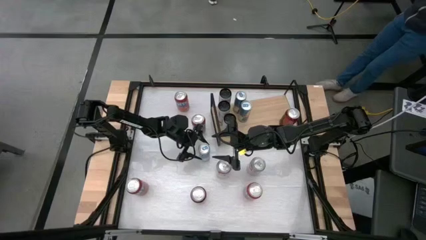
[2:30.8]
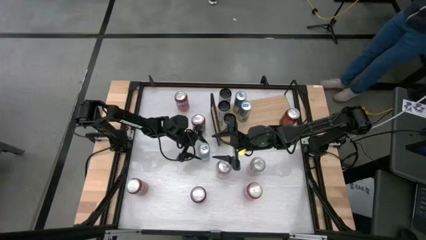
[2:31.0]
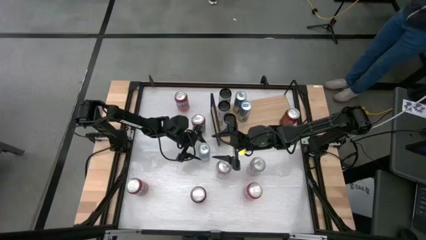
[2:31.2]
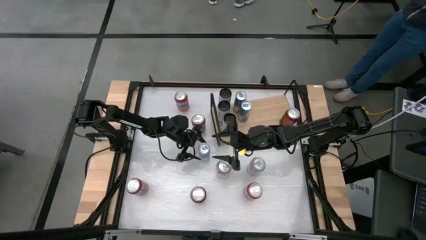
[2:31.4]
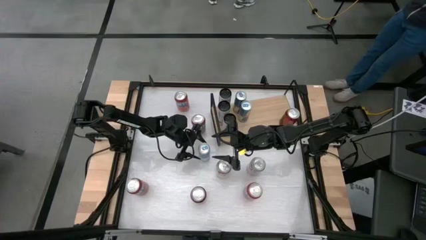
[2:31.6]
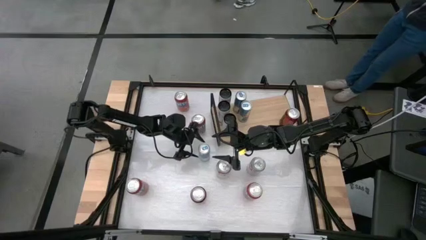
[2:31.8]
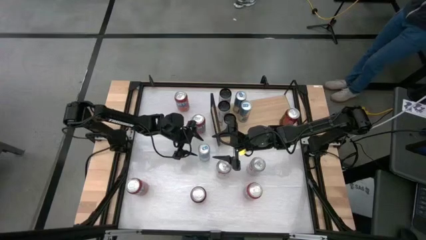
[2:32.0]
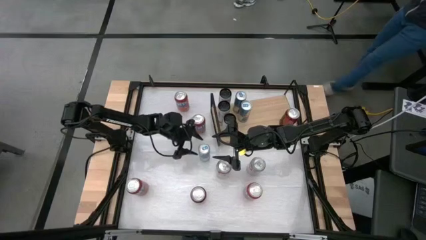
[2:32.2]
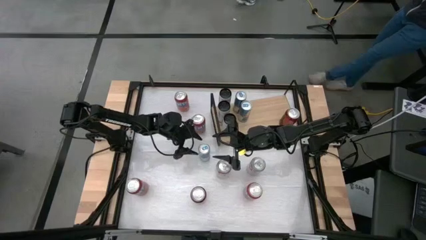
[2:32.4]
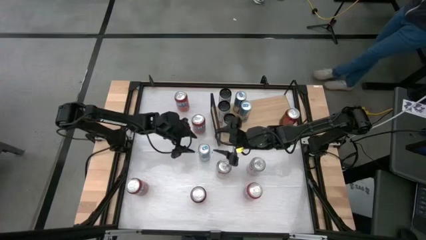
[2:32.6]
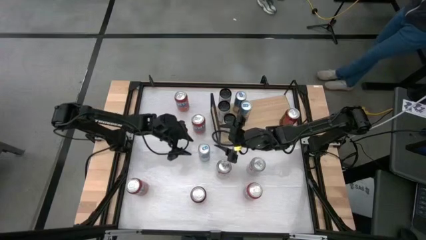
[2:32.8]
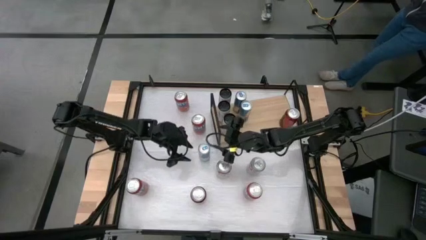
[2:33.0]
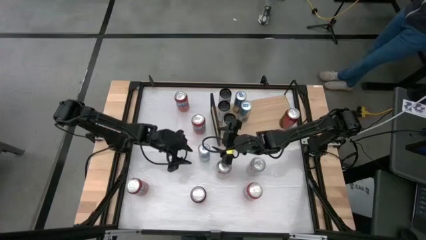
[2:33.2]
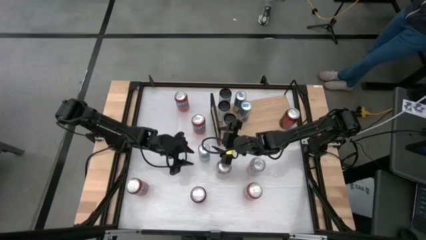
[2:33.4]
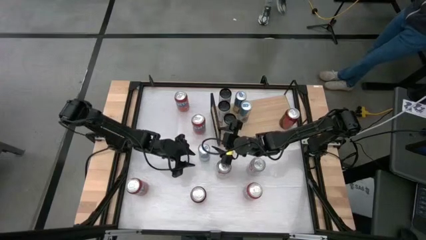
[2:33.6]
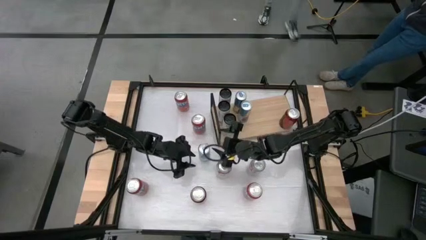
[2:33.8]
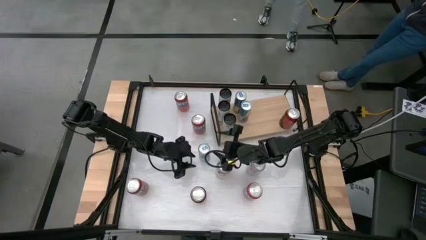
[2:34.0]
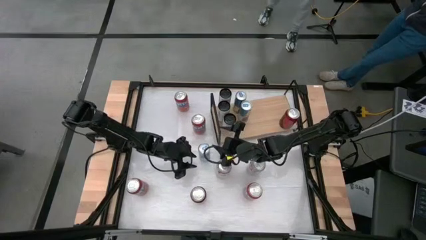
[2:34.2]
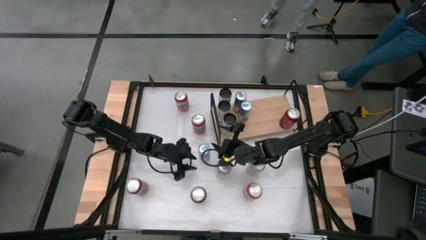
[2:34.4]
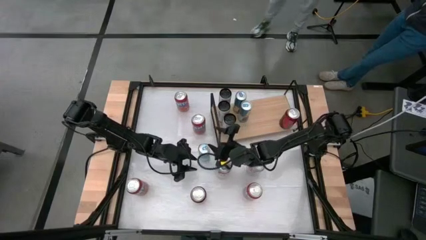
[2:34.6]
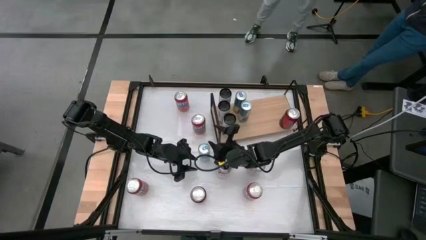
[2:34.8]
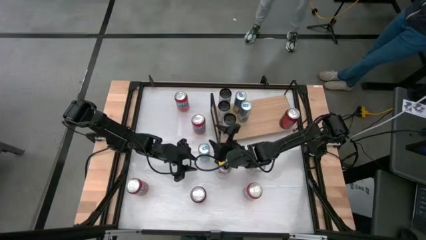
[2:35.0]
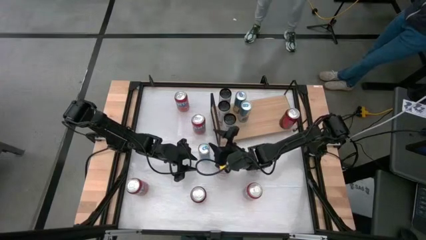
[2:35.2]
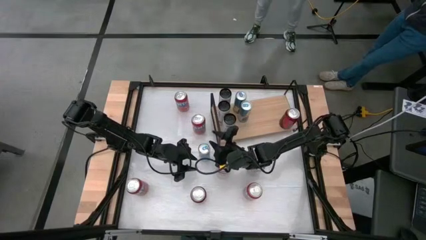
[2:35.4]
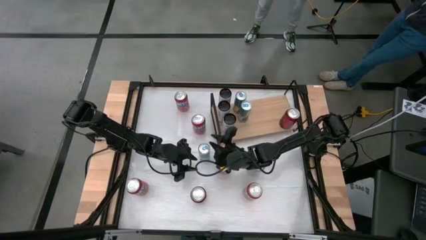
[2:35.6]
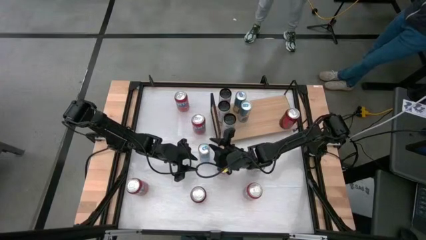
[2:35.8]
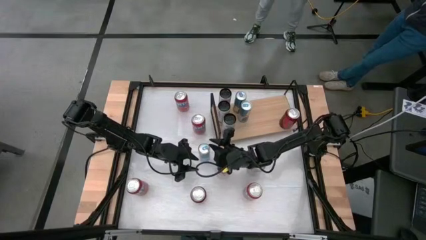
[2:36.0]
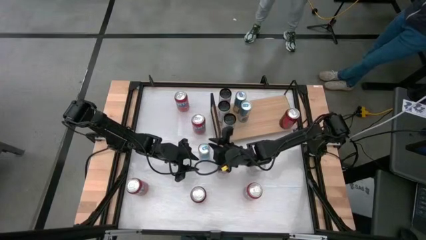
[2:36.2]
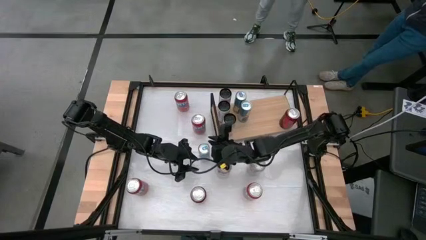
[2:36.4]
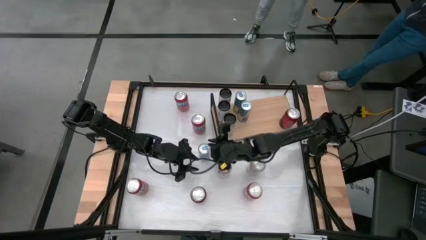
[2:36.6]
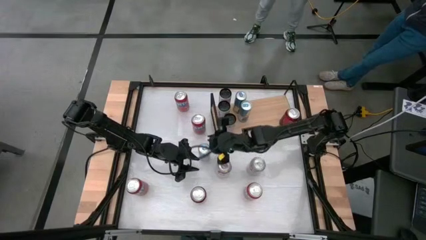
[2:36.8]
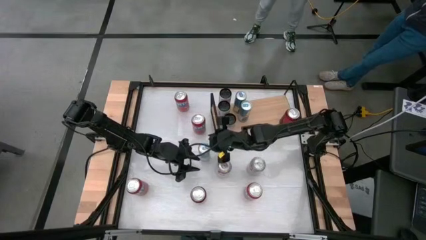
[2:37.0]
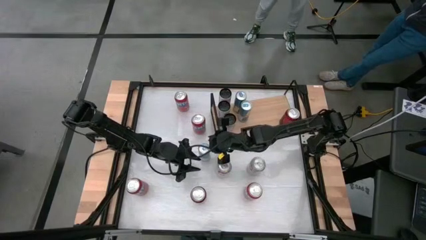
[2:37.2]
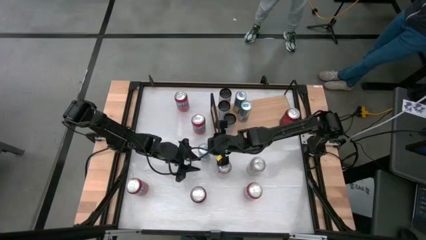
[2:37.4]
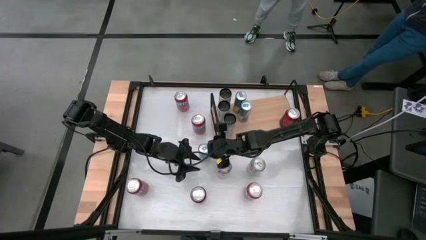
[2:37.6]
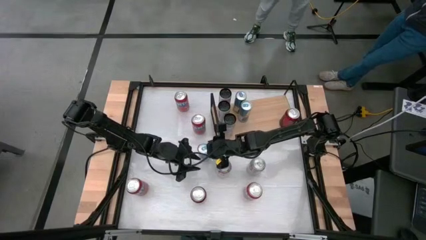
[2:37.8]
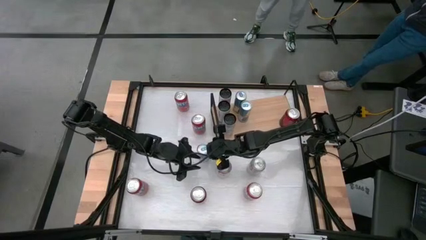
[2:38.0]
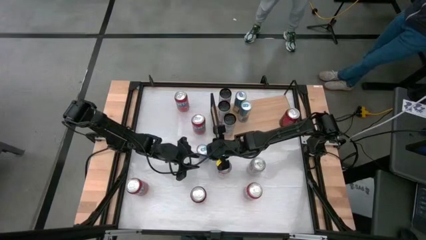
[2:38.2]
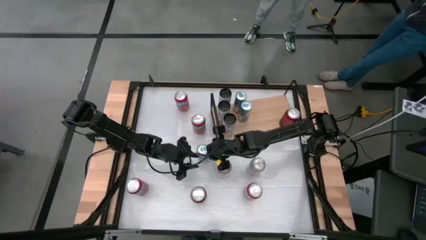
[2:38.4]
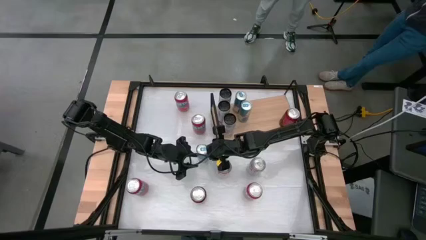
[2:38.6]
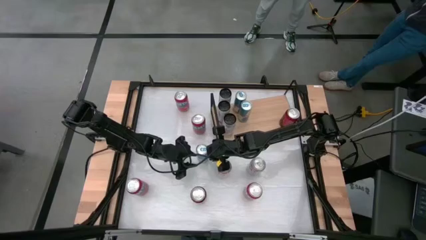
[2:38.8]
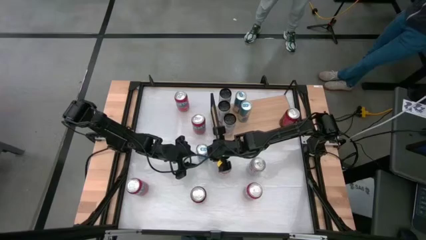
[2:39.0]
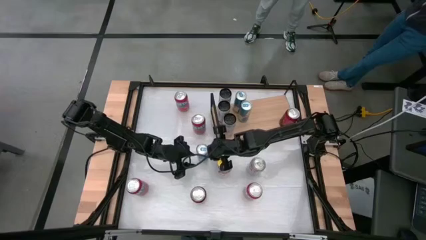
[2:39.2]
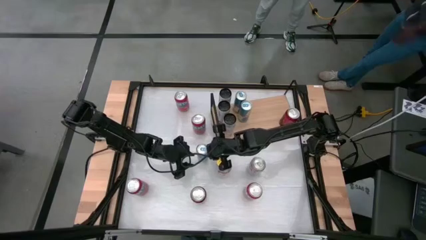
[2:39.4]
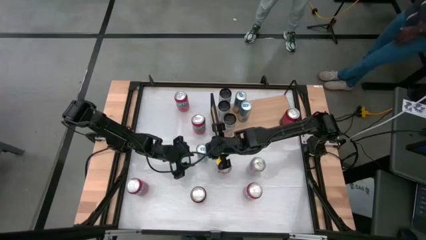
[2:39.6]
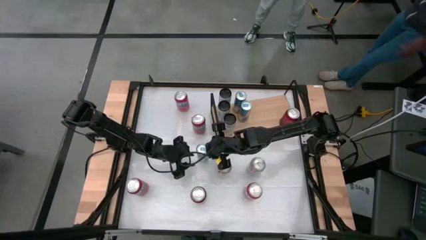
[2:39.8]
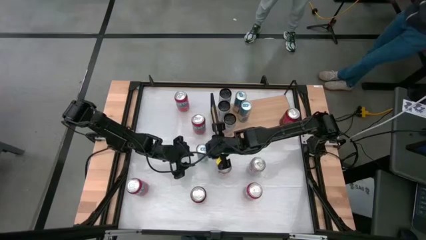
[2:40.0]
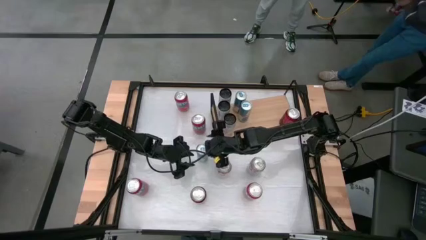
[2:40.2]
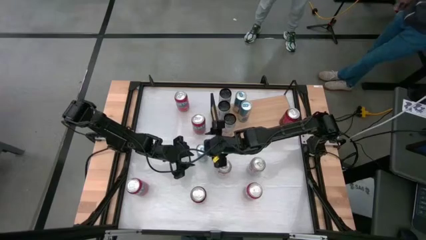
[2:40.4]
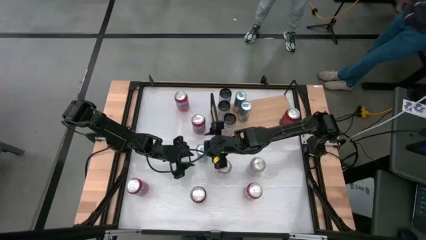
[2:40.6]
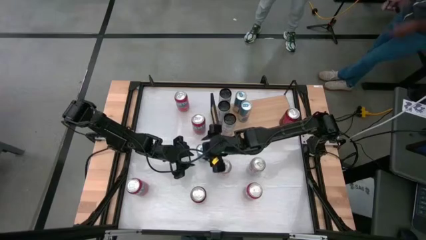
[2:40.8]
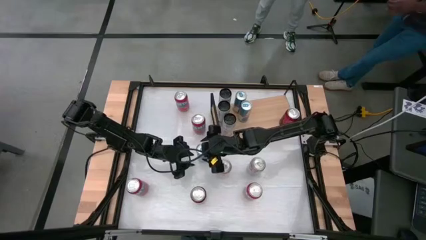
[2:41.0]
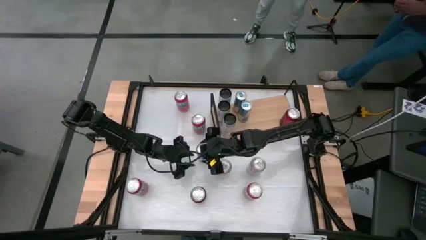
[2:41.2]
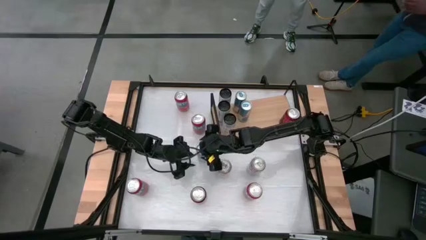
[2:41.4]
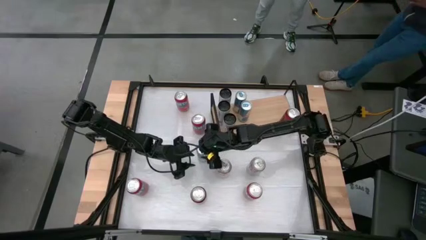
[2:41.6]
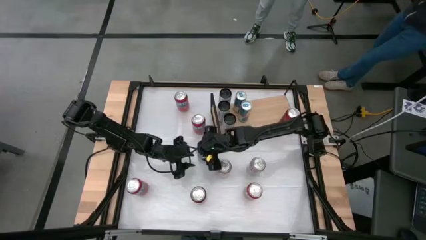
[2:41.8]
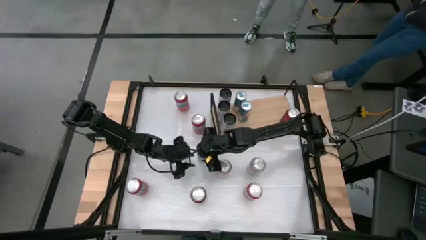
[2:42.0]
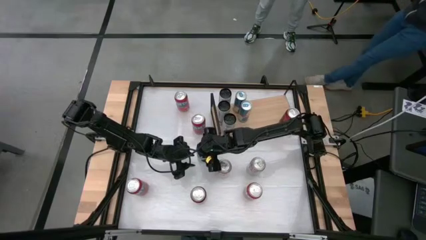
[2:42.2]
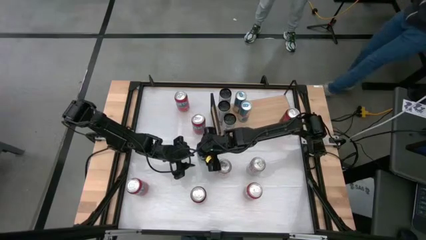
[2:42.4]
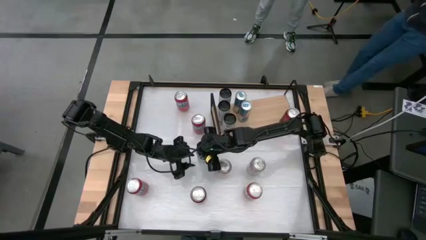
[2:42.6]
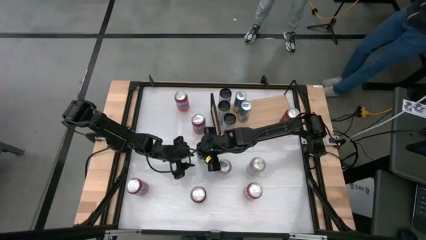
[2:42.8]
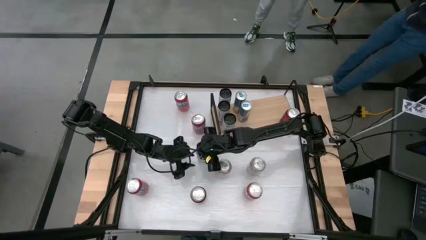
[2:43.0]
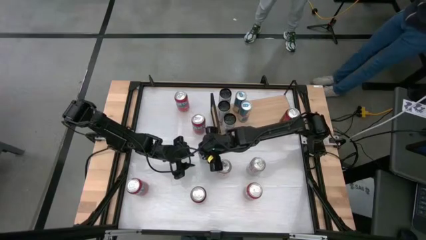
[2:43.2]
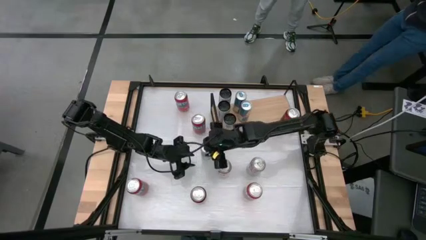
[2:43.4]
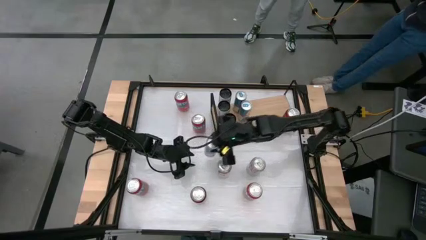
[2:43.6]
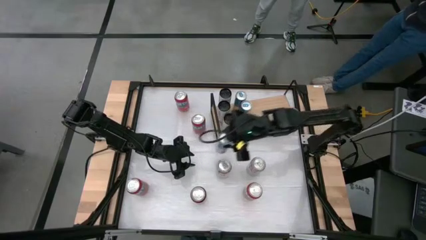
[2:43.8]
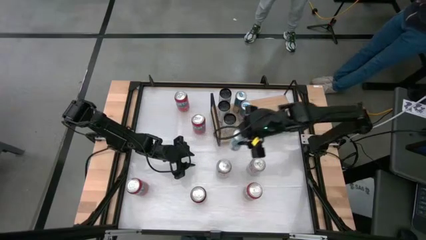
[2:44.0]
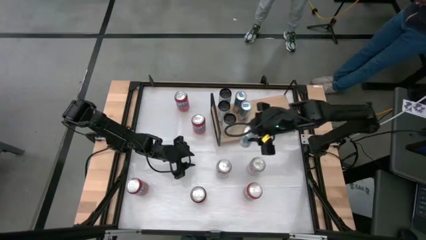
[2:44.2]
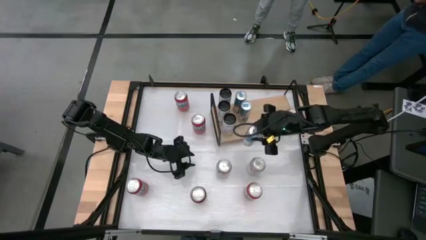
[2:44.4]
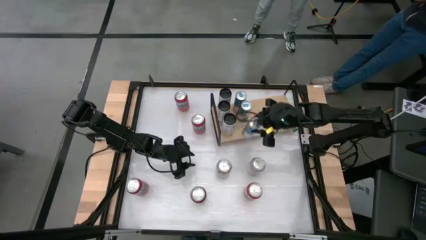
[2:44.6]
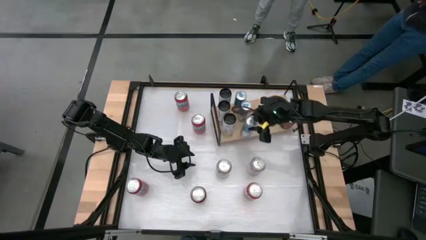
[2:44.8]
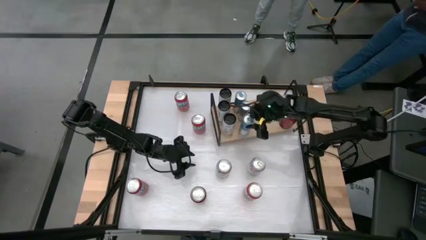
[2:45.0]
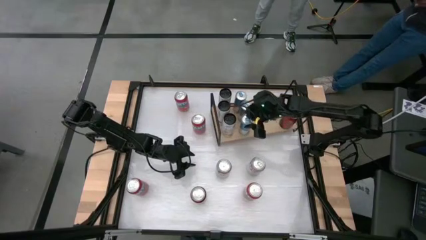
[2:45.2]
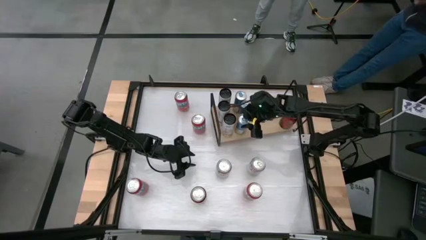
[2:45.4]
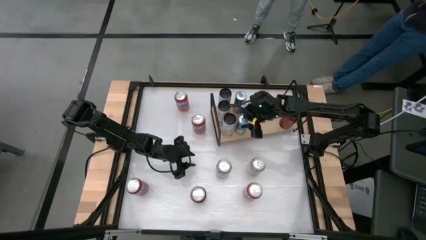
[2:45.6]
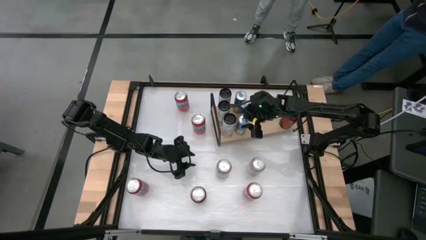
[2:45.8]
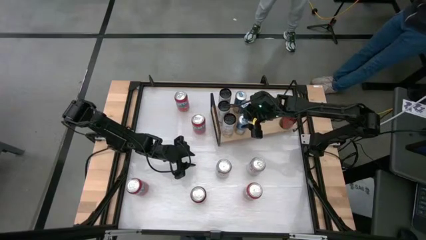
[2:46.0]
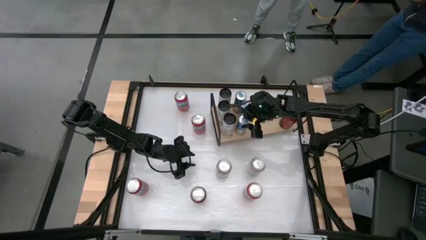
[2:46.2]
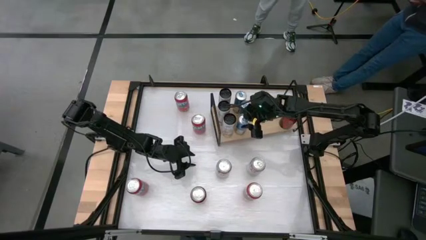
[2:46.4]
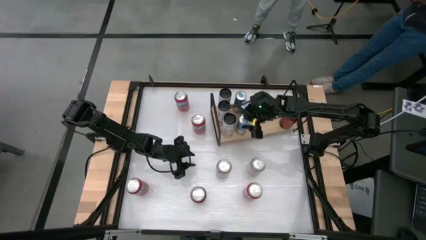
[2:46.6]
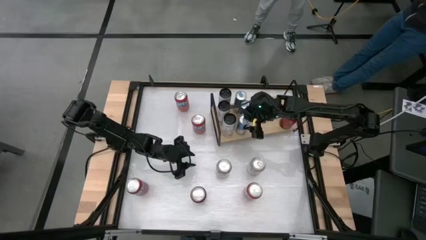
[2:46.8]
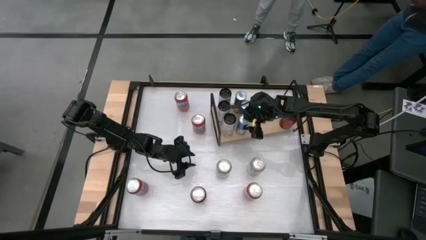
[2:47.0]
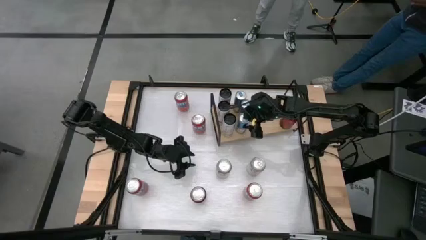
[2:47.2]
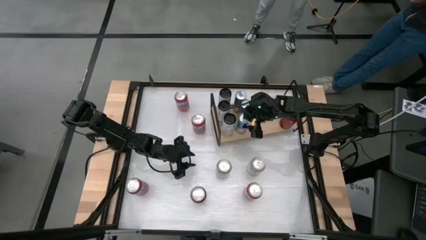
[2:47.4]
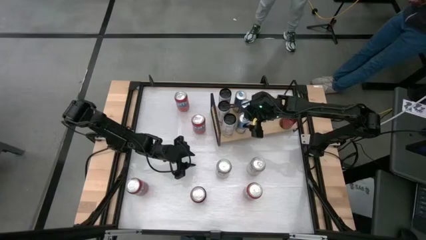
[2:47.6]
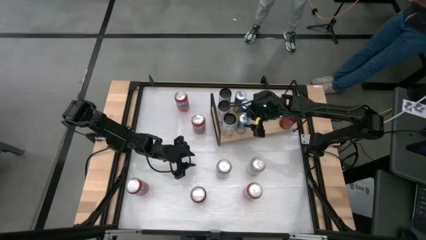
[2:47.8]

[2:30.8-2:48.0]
Task: Place canned beverage on shelf
Put the blue white soda can on the shelf aligned with the other blue white soda cans
